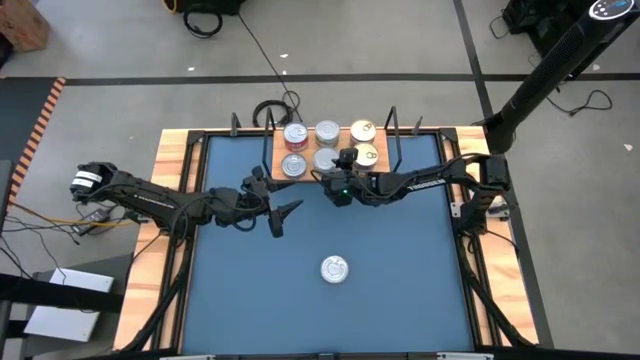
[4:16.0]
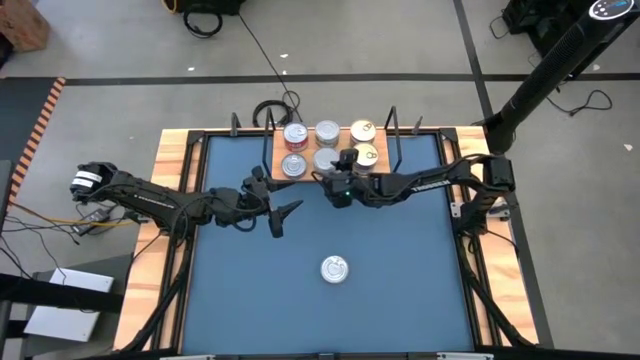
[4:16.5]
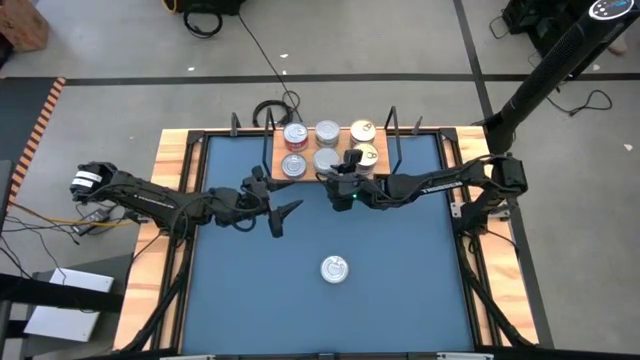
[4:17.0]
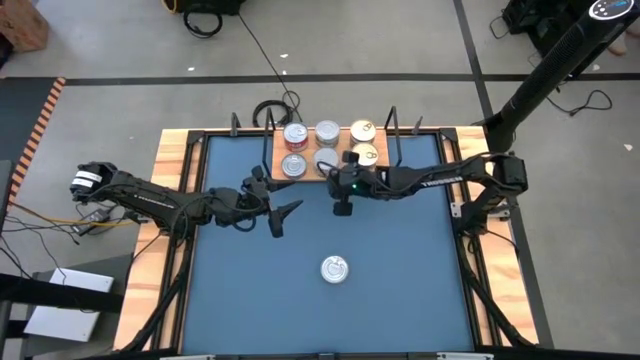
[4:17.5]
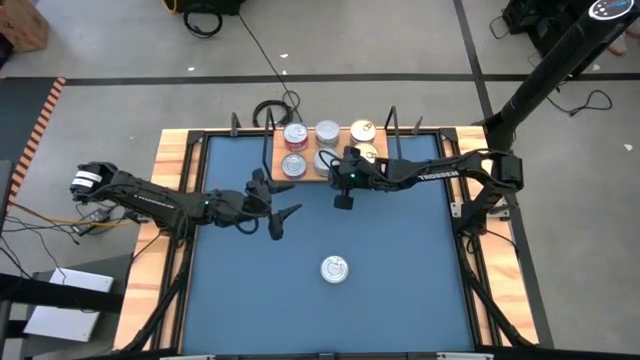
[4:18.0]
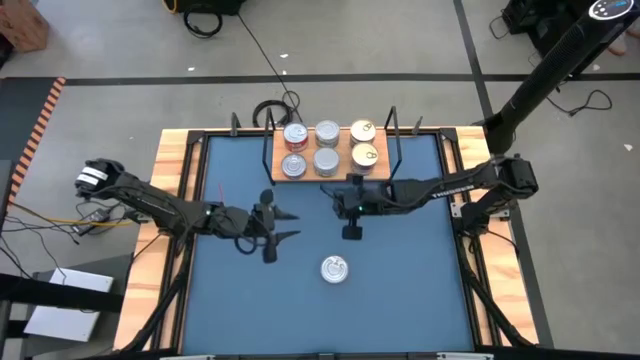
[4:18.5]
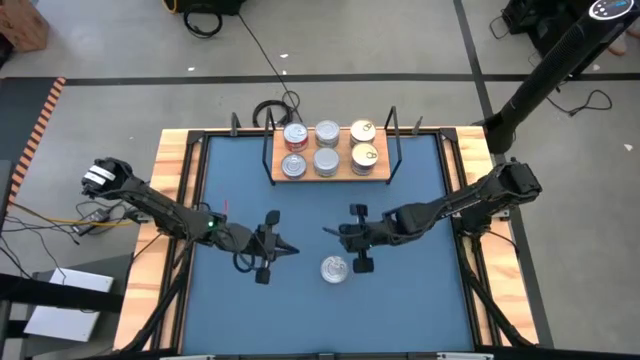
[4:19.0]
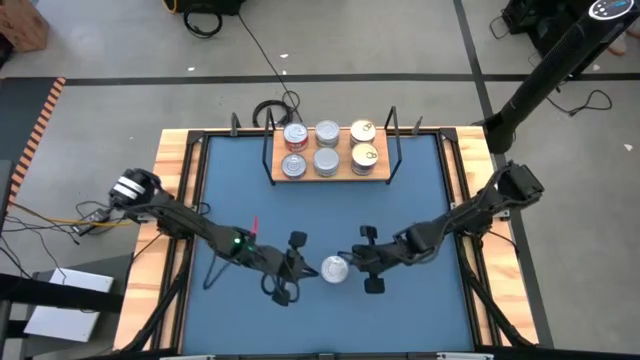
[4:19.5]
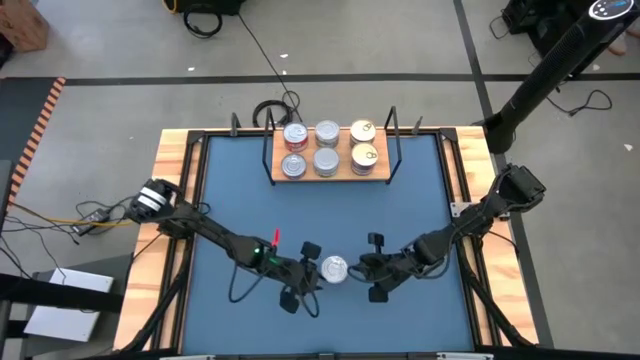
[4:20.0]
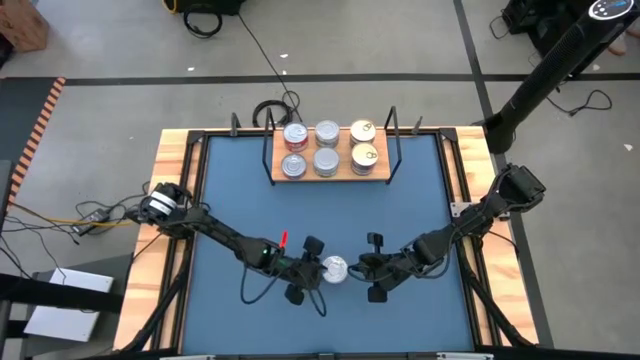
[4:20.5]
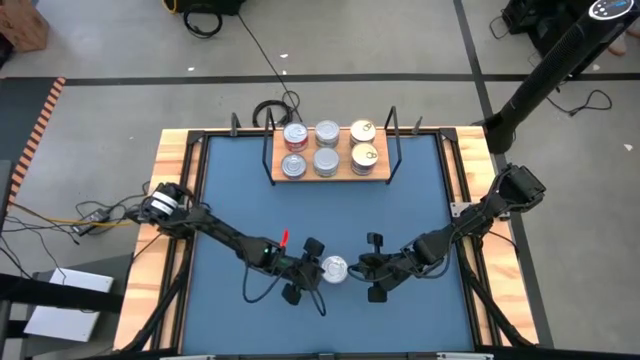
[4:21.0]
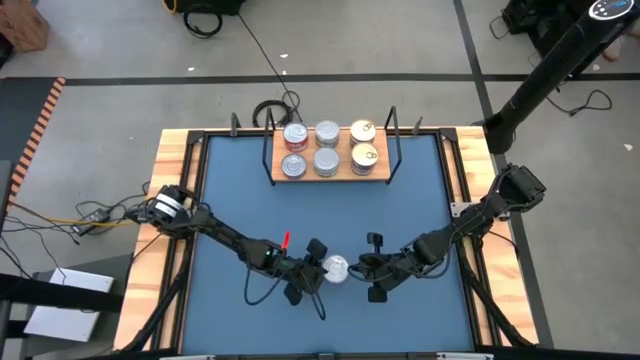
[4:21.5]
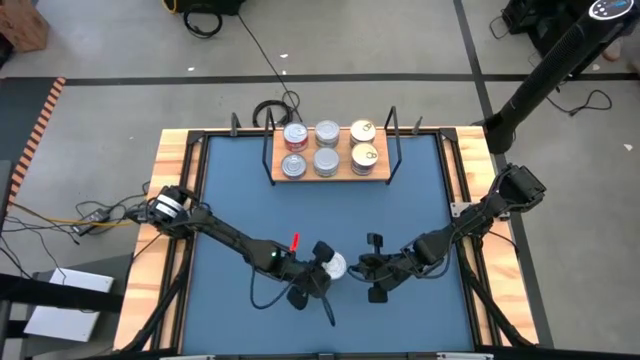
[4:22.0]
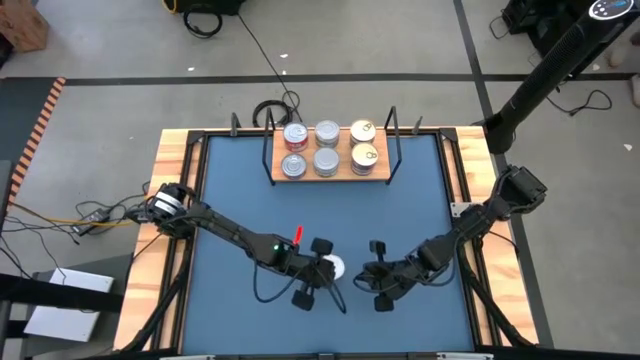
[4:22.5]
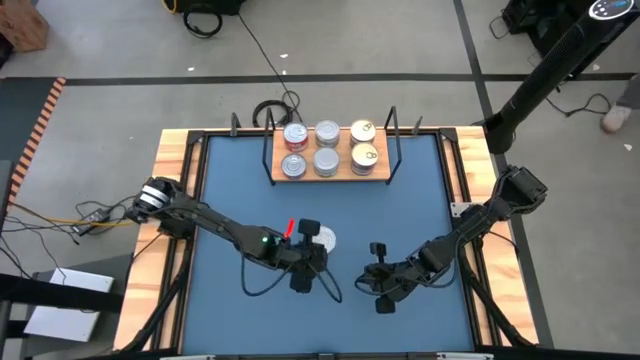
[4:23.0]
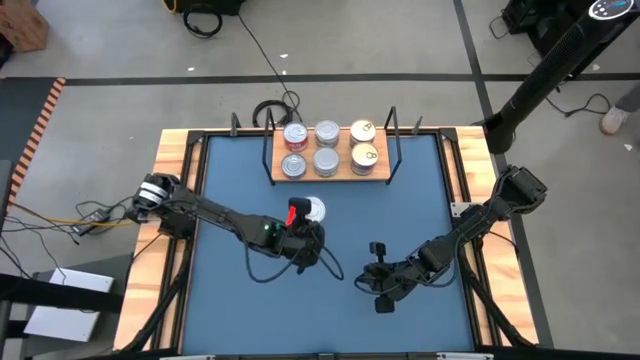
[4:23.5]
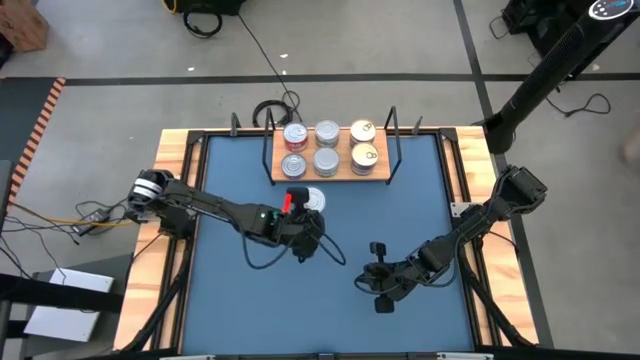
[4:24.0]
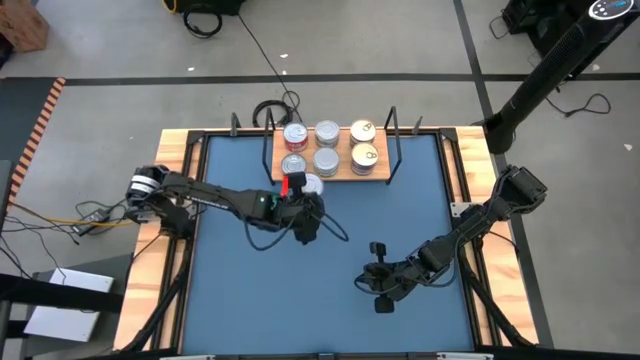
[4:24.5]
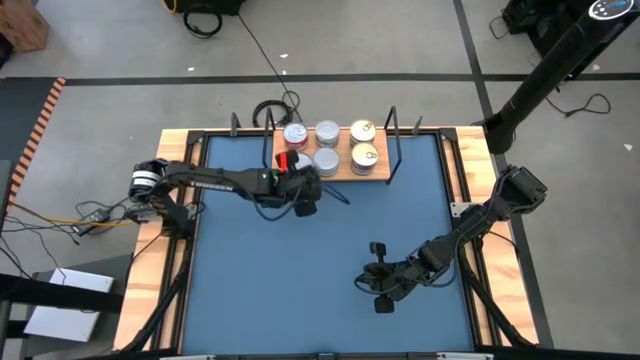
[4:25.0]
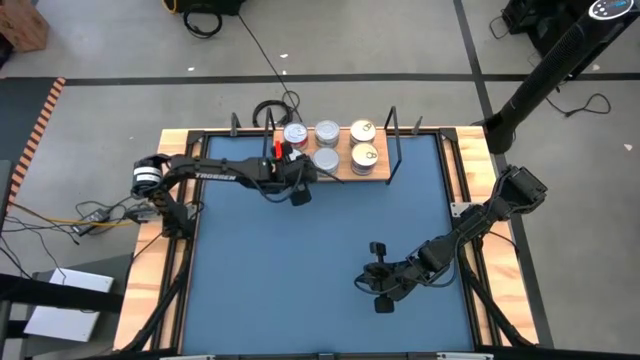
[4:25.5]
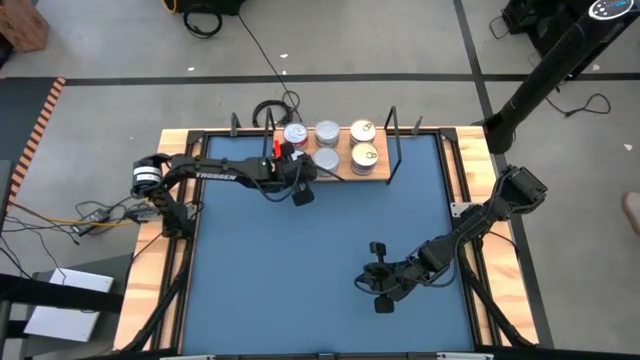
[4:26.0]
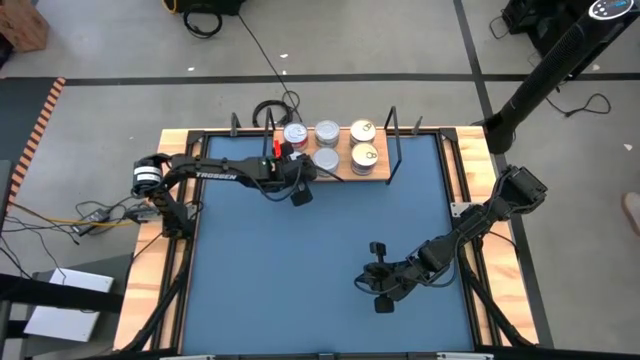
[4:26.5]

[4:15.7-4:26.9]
Task: Stack canned seafood by type on shelf
Stack the red tuna can on top of the other red tuna can on the shelf

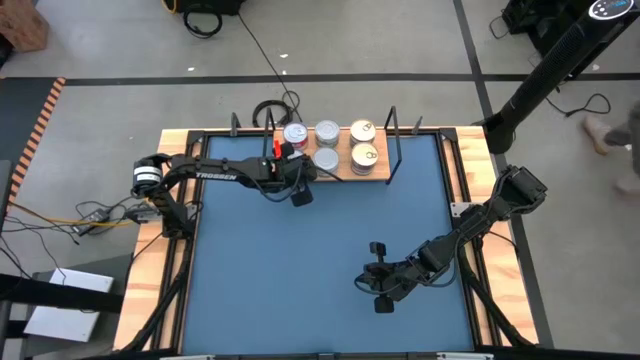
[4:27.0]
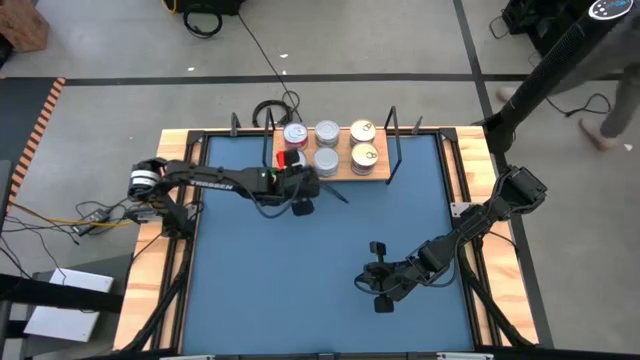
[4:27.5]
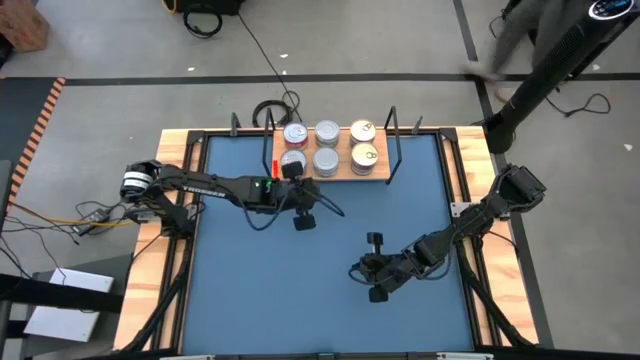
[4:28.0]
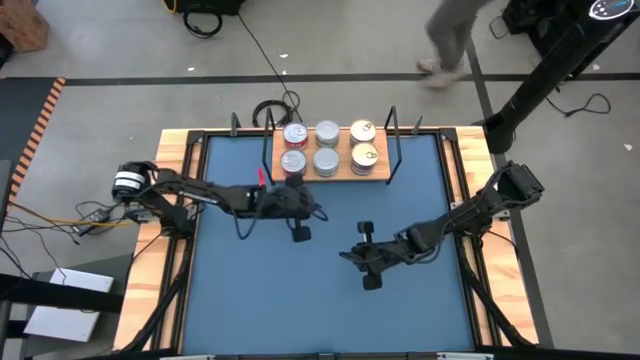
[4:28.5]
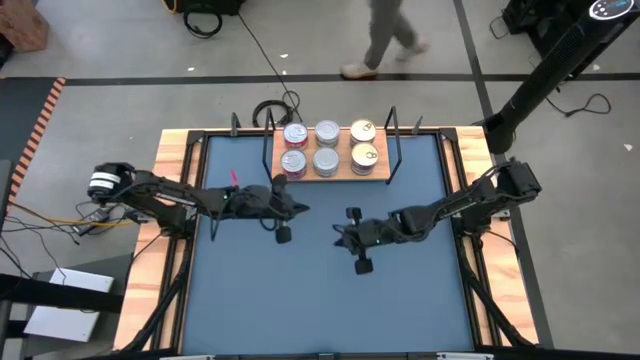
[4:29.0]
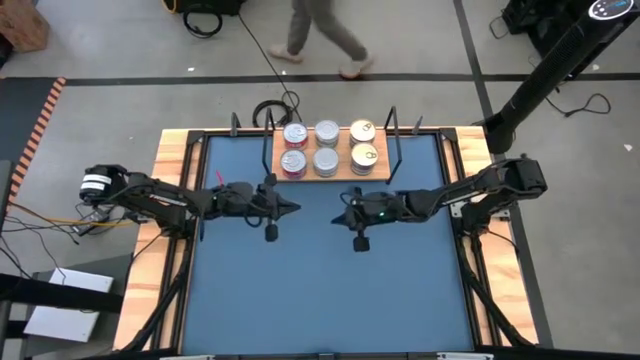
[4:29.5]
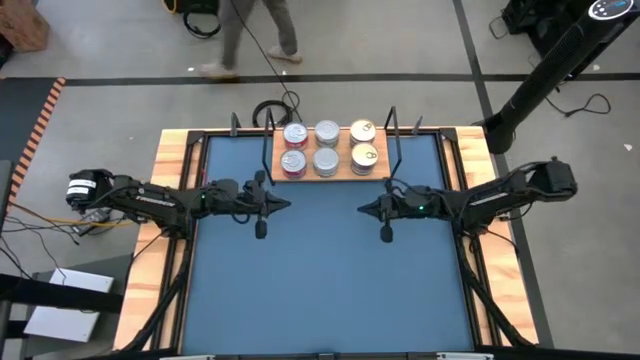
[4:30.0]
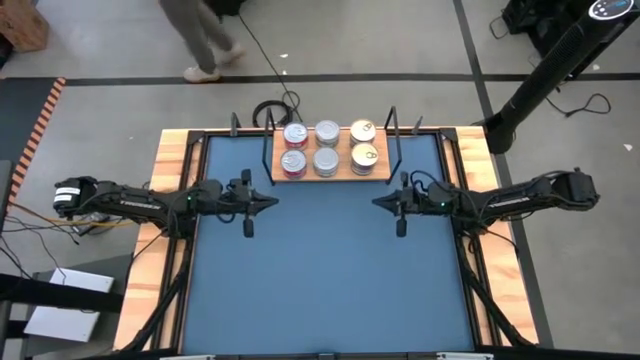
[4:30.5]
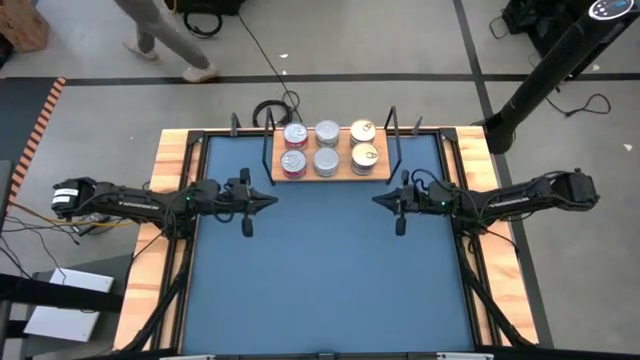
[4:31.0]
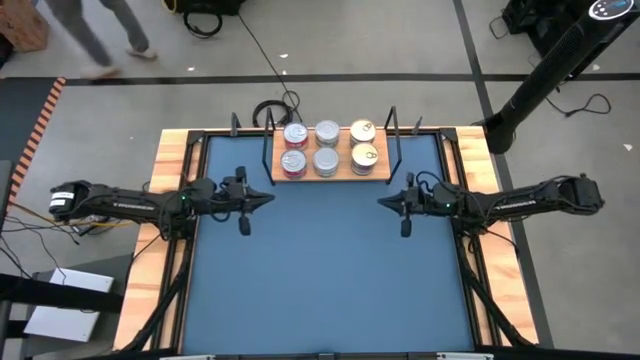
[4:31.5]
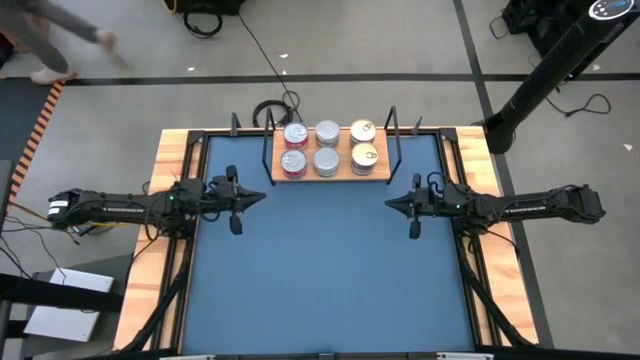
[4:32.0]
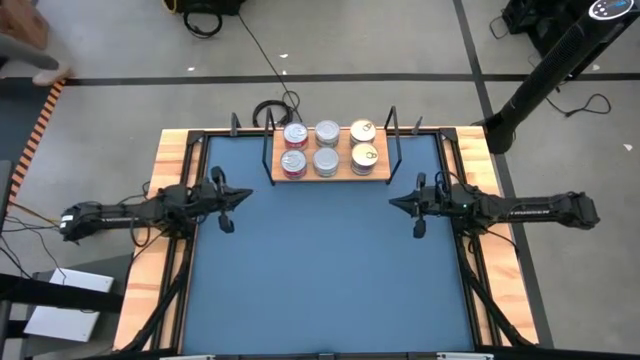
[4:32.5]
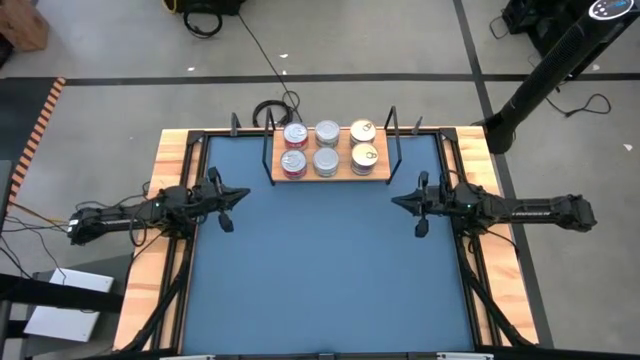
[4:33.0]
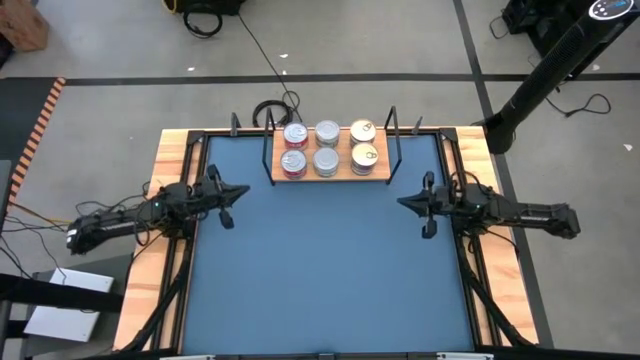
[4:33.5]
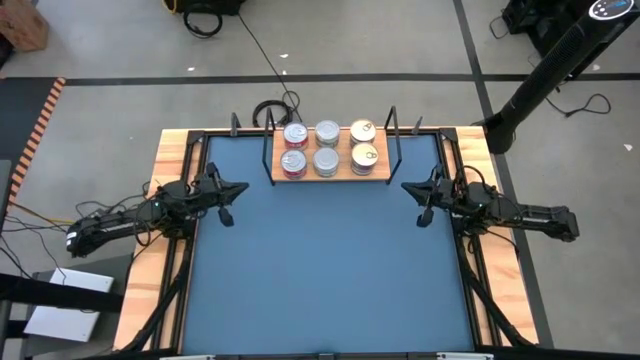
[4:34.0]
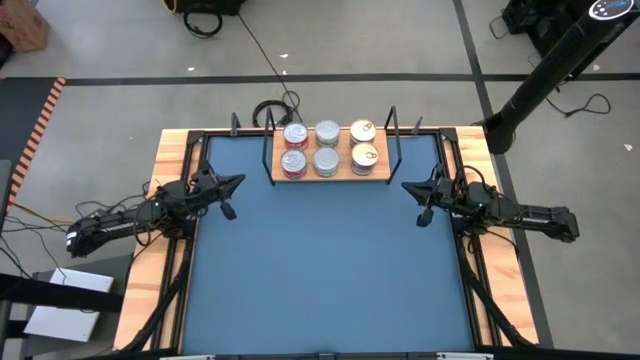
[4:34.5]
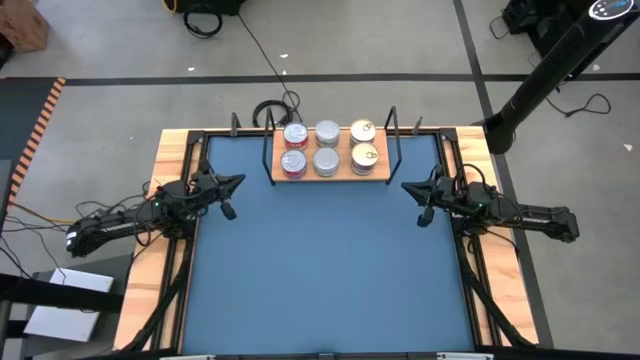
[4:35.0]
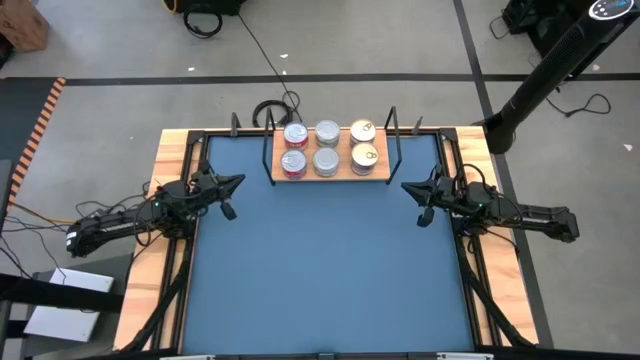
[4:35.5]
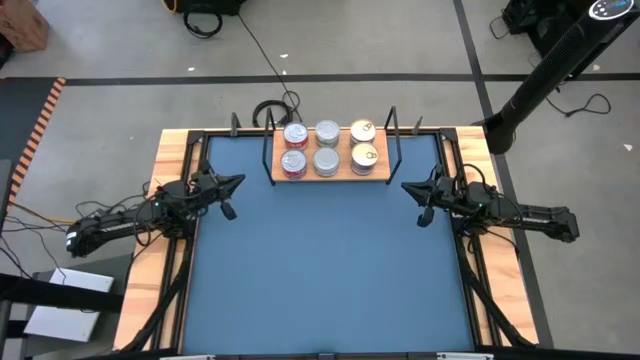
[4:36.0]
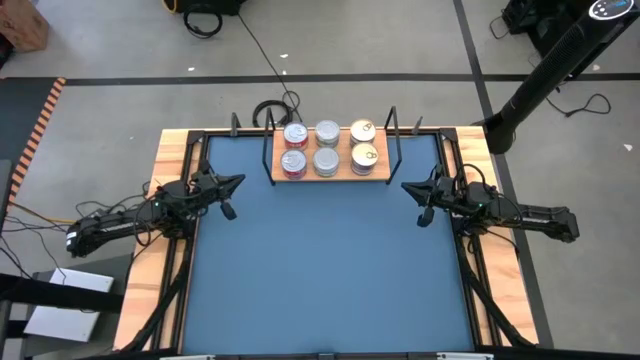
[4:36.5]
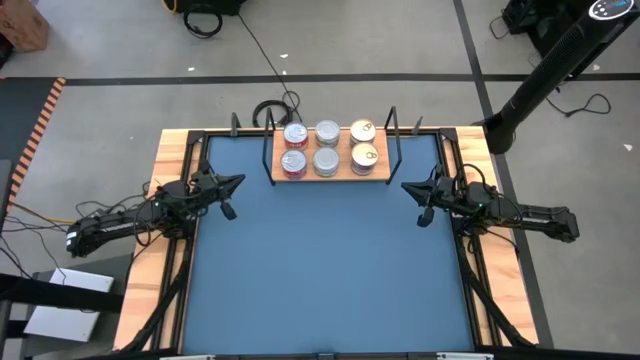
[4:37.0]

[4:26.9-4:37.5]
Return to Home Position
